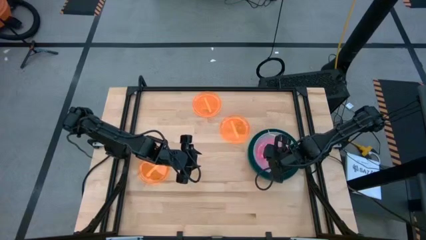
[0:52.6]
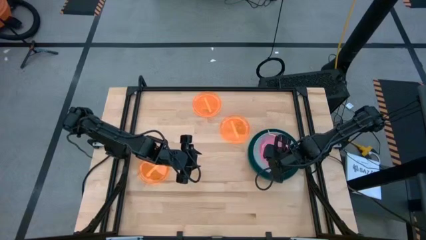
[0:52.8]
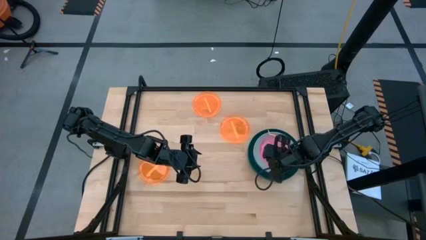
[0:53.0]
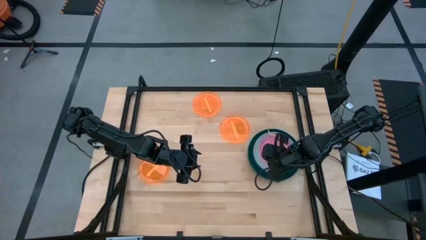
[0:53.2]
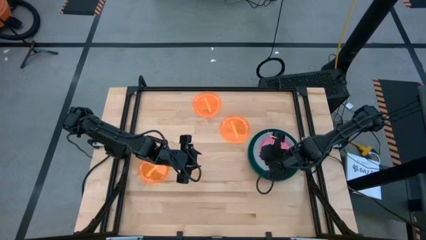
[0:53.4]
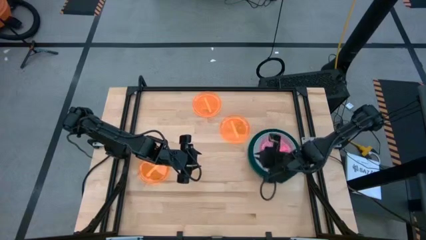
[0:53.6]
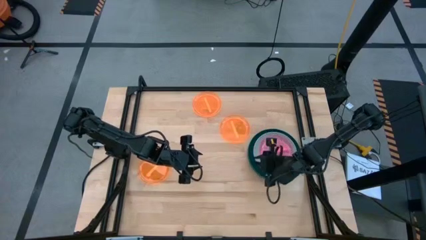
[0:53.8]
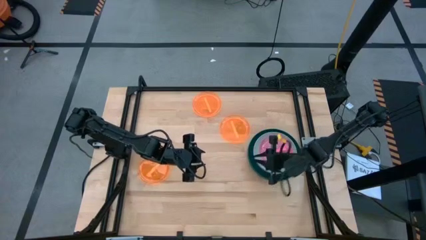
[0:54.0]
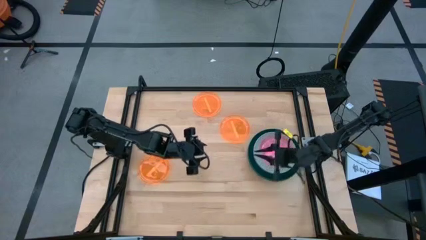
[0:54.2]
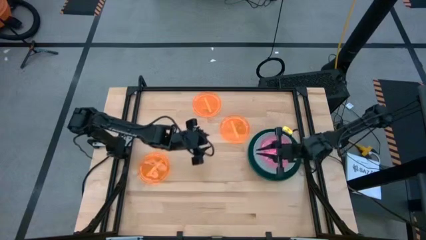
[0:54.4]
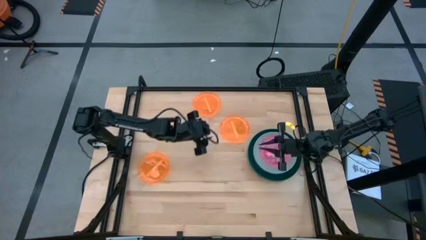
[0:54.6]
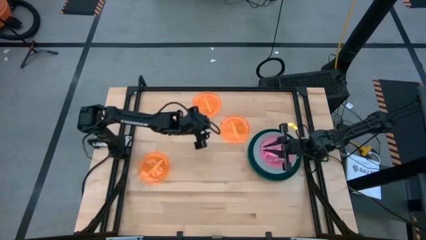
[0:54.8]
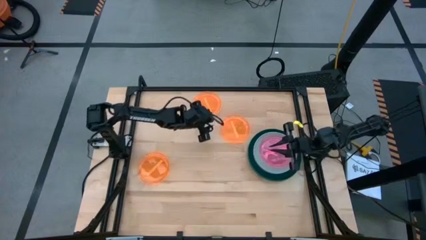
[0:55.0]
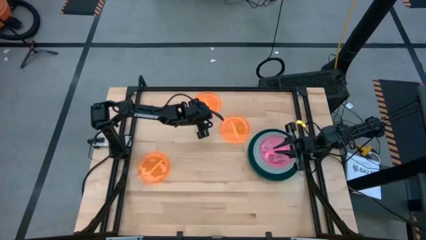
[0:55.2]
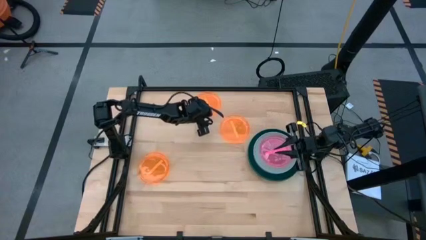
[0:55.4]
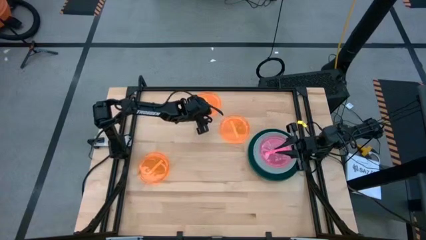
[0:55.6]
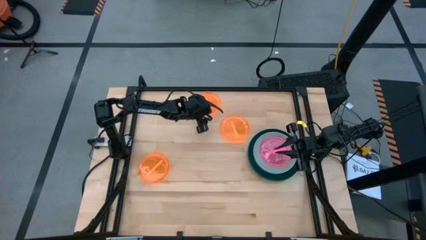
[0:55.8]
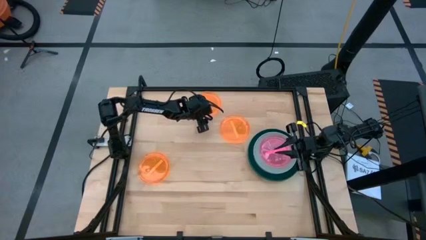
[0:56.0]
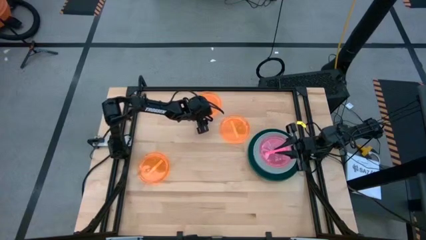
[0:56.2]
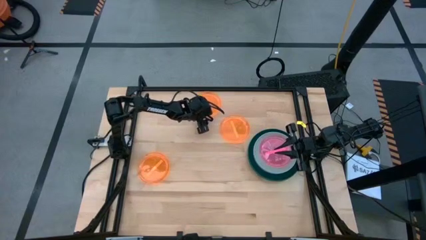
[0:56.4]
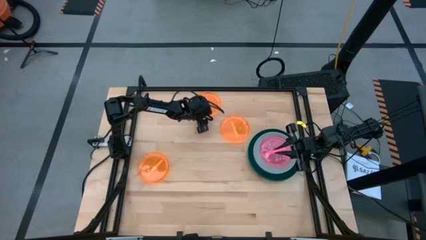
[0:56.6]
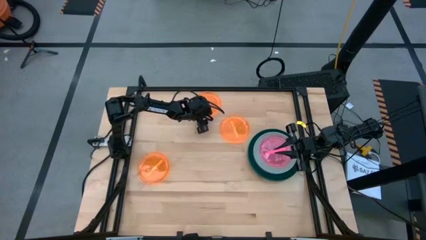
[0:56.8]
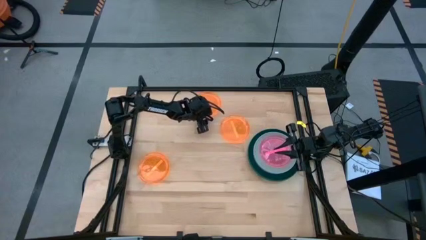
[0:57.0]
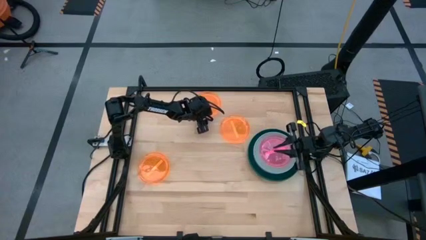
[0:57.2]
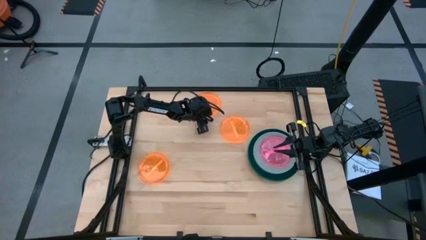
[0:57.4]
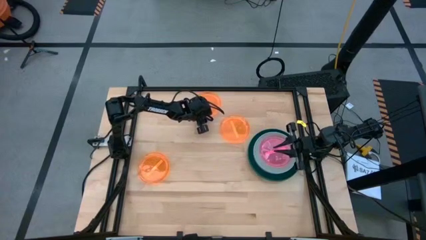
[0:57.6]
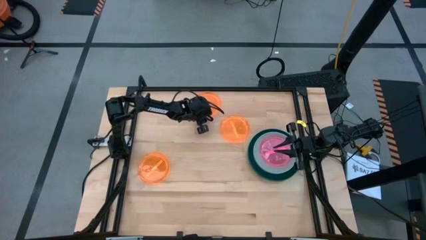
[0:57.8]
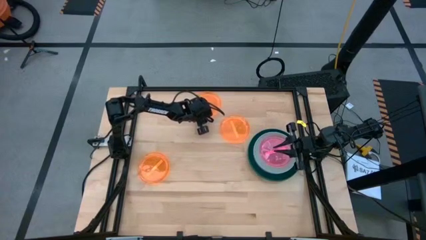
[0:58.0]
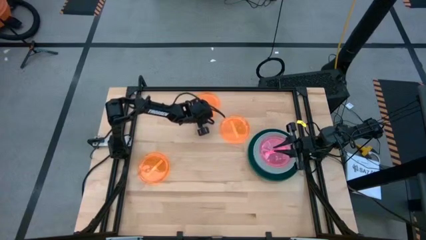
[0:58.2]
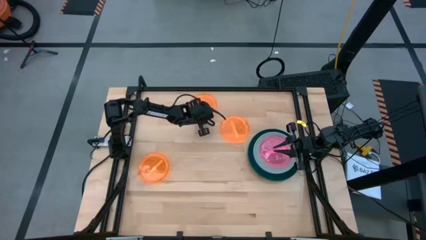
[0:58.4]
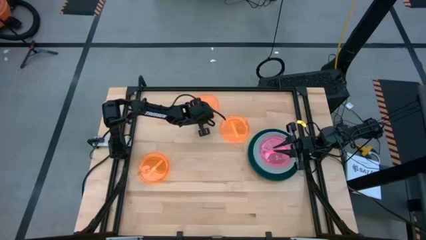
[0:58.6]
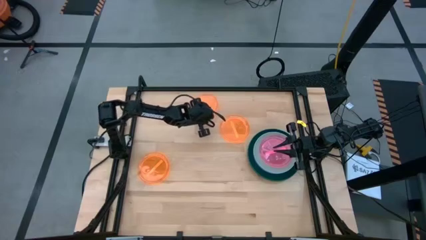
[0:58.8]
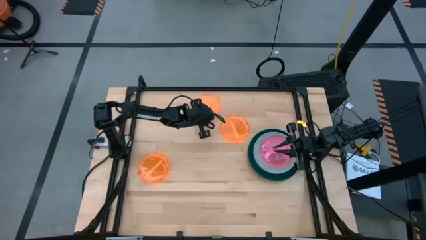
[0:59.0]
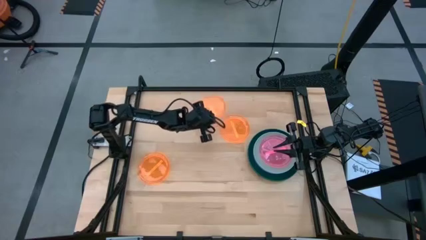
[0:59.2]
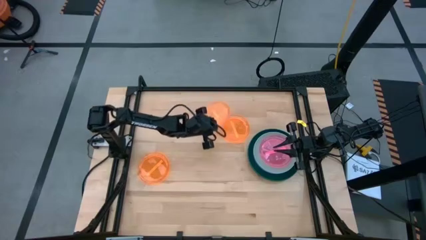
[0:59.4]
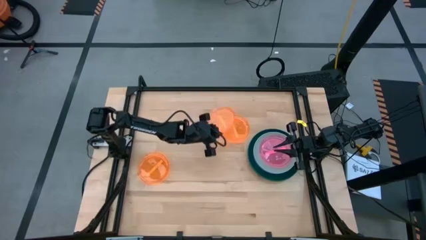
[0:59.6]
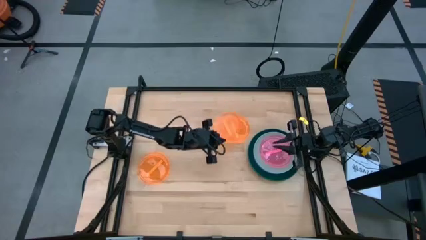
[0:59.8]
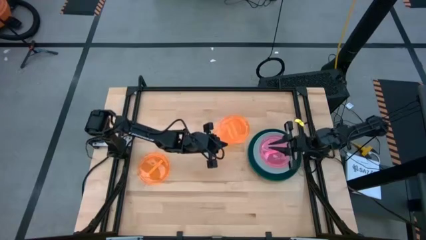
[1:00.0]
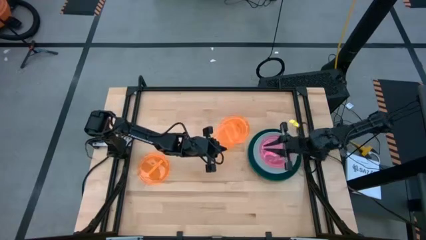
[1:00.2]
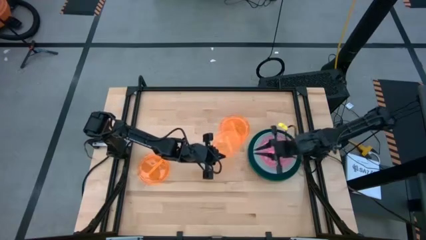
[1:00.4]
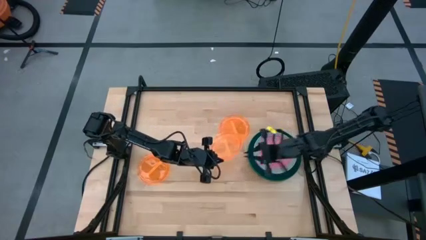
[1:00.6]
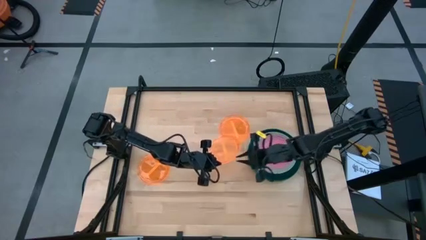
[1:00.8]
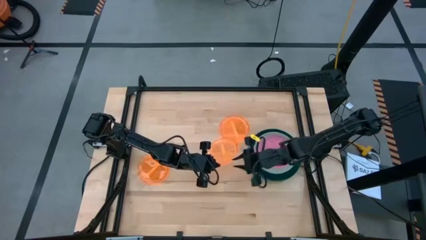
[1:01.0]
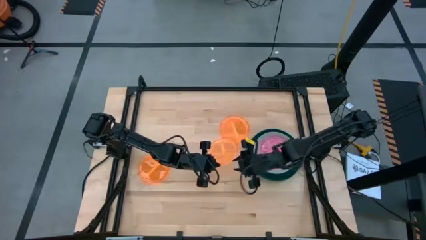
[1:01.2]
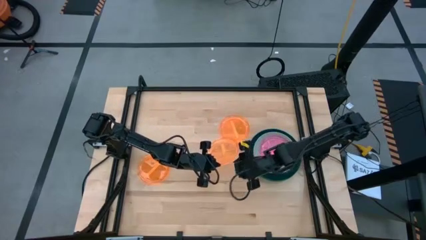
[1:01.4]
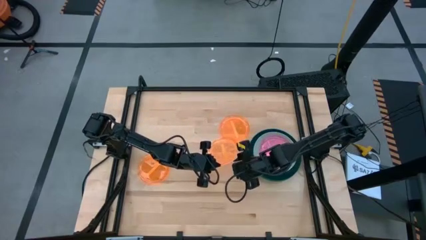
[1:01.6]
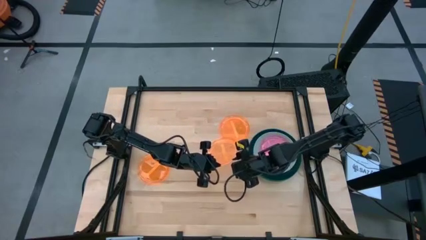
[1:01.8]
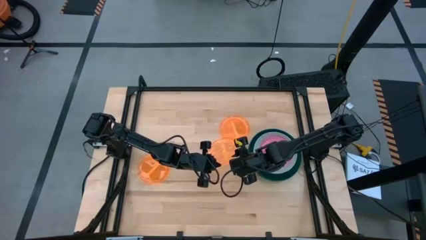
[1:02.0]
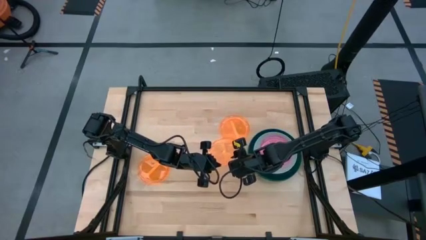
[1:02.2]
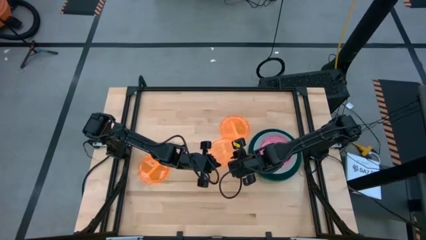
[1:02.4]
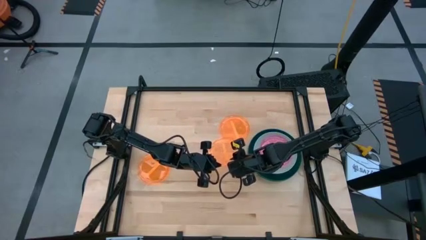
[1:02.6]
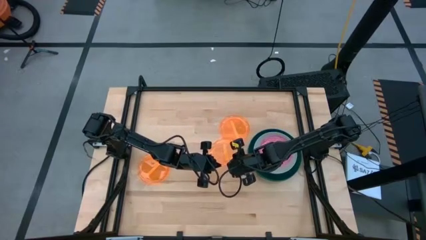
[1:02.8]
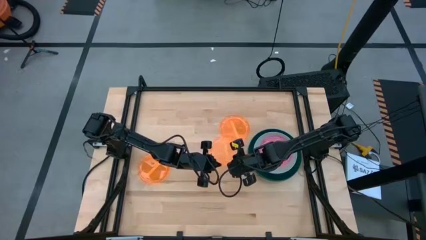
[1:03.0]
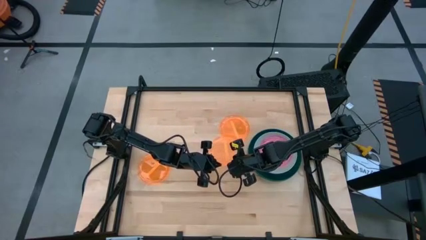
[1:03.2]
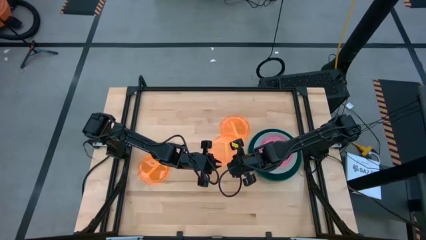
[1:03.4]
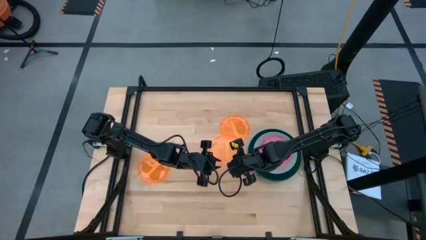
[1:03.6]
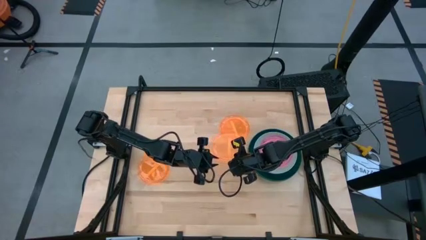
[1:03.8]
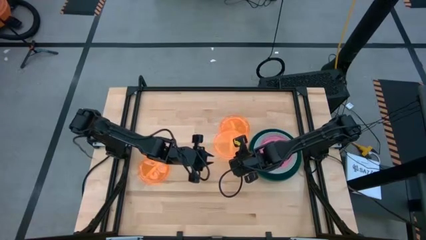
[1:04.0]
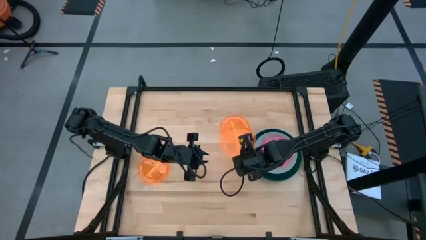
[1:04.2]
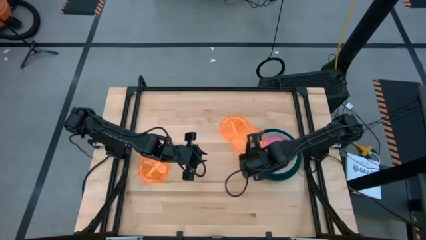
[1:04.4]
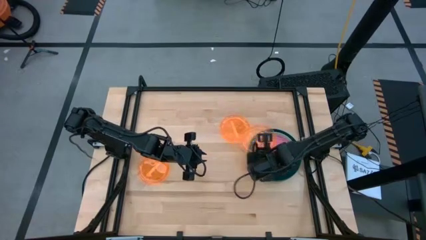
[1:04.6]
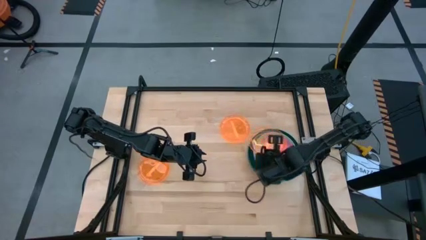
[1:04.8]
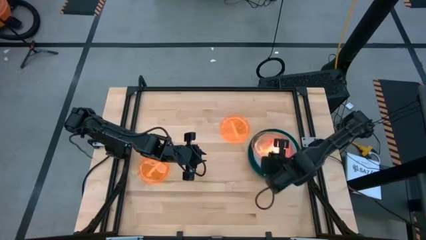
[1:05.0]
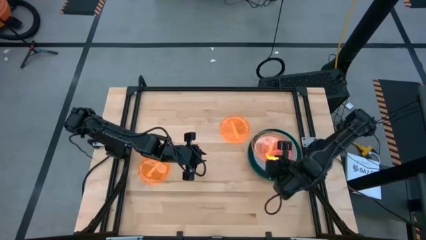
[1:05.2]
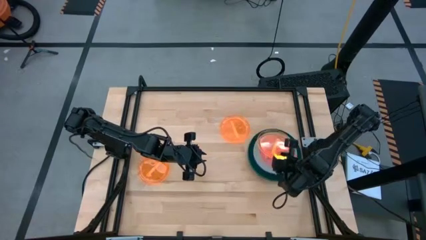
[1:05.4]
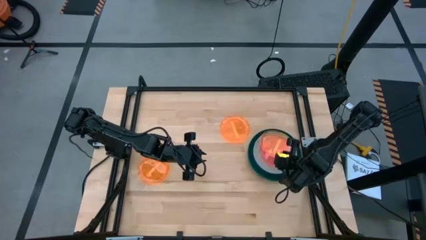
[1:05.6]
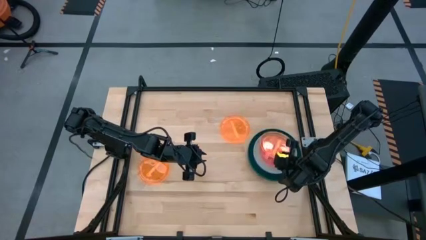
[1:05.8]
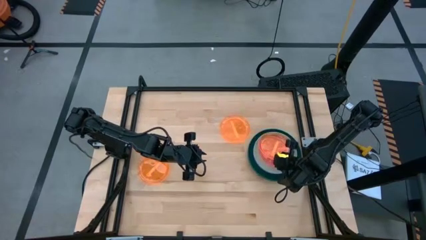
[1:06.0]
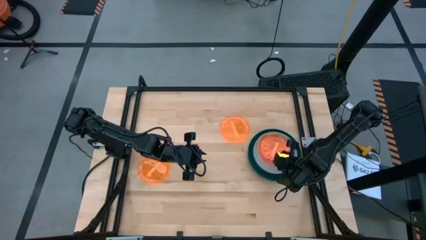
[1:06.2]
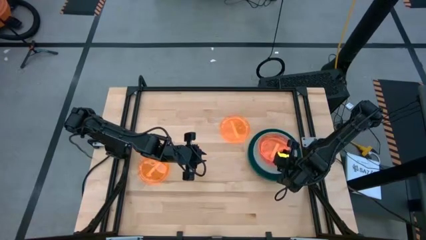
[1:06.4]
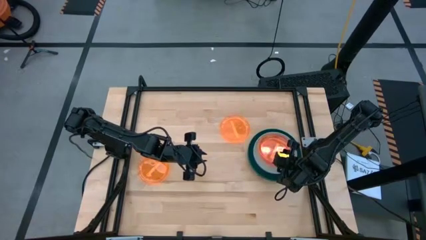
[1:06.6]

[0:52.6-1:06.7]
Task: Stack plastic plates
Stack the top orange plate on top of the pink plate

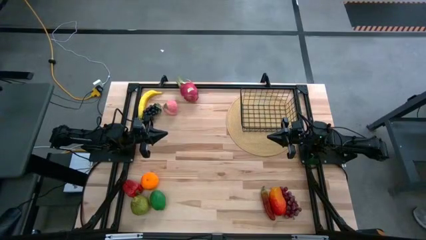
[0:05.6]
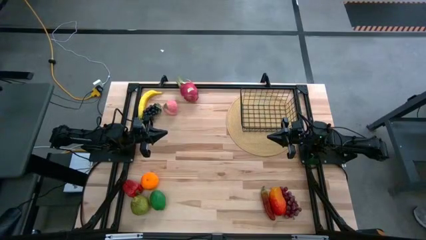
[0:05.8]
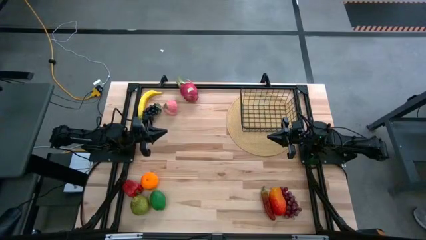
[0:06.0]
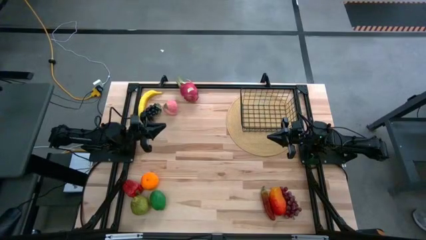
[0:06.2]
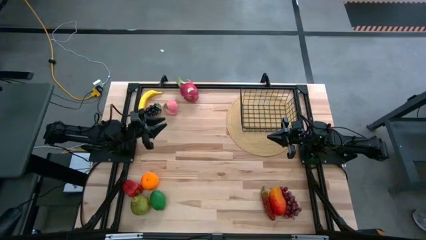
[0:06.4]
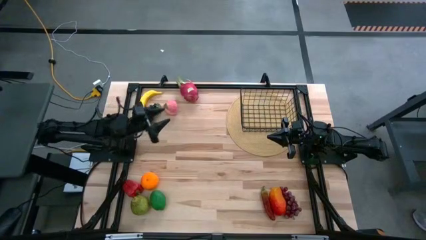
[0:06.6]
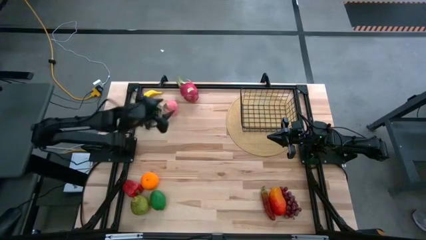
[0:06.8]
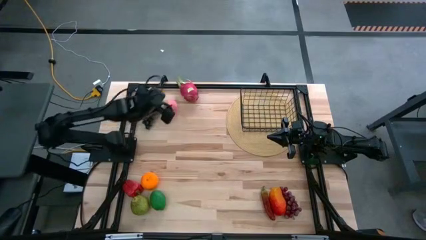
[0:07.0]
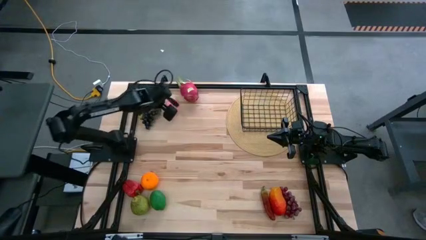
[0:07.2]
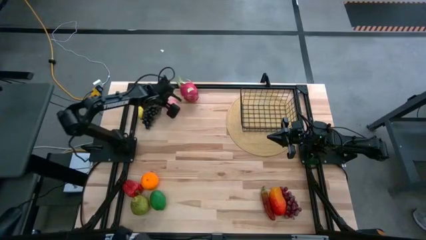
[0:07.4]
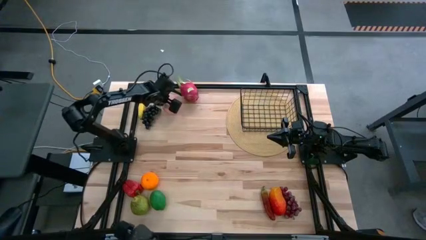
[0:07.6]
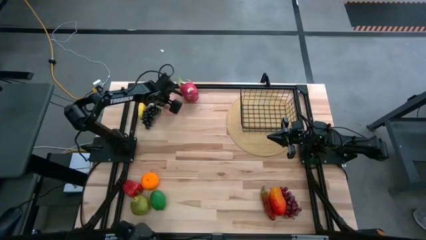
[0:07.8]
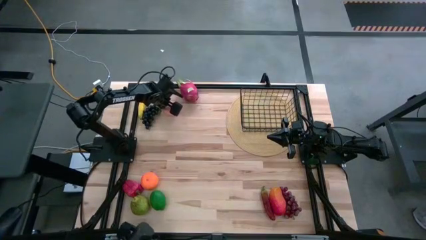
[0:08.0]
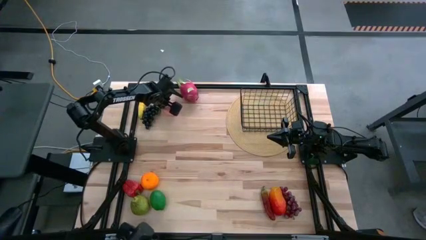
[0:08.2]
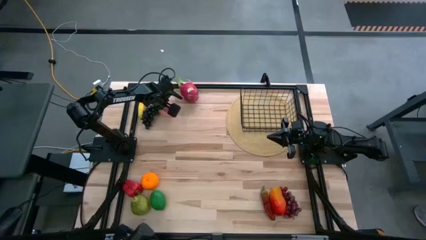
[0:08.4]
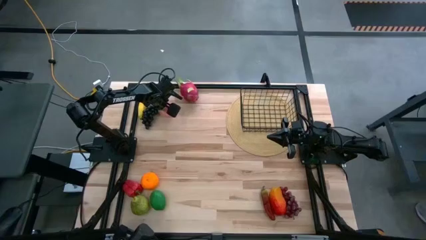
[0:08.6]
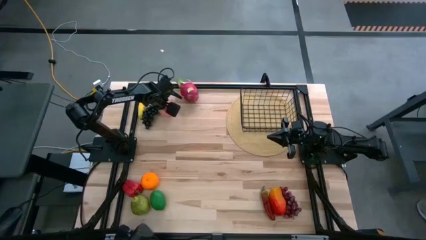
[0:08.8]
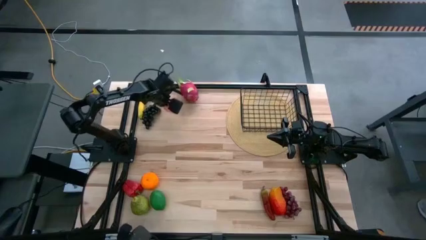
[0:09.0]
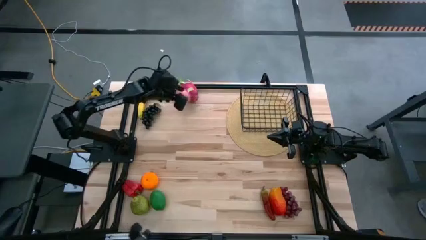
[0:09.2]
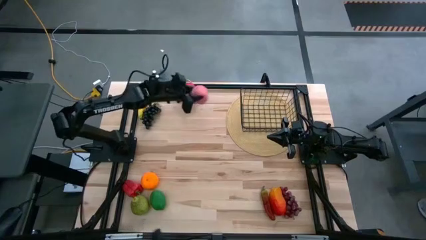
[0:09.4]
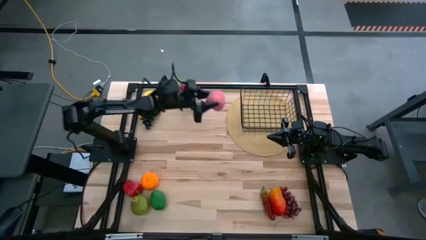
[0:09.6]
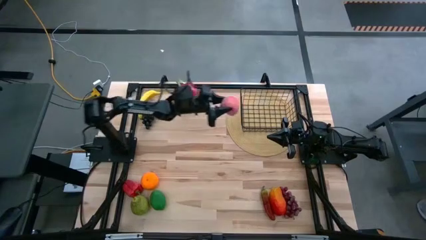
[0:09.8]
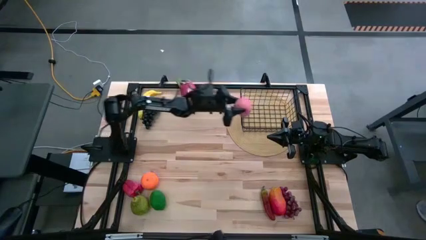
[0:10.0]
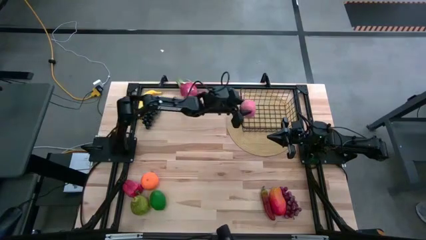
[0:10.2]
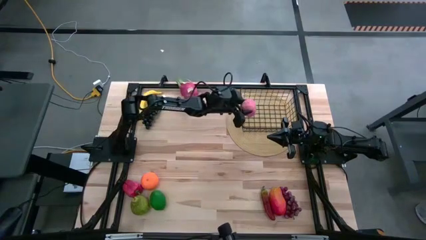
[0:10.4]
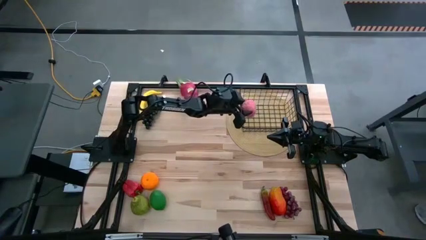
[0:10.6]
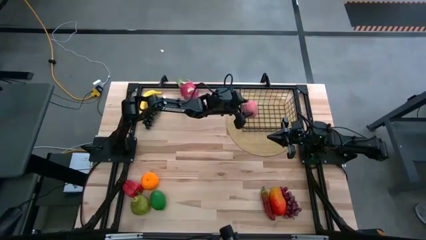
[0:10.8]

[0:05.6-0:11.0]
Task: Build produce basket
Put the peach into the wire basket
